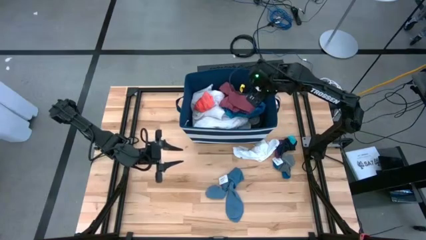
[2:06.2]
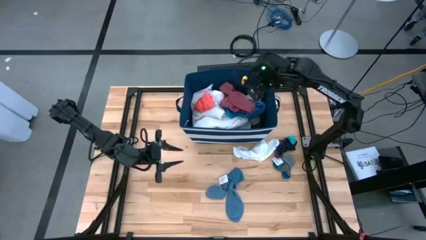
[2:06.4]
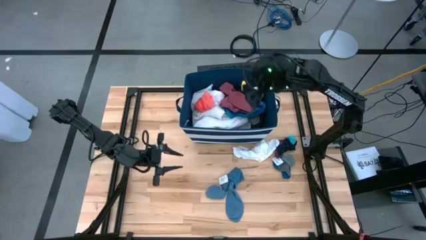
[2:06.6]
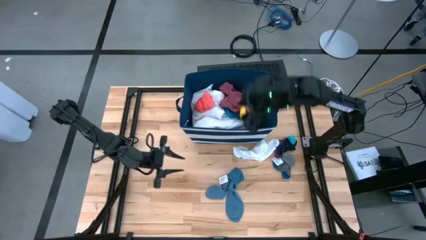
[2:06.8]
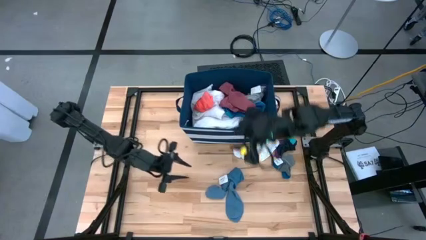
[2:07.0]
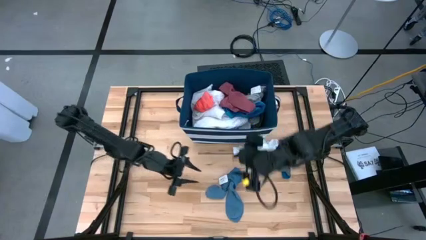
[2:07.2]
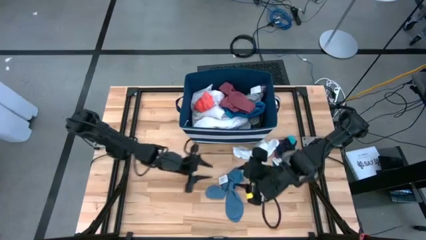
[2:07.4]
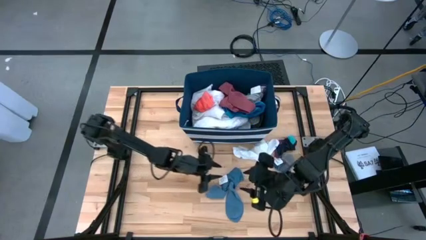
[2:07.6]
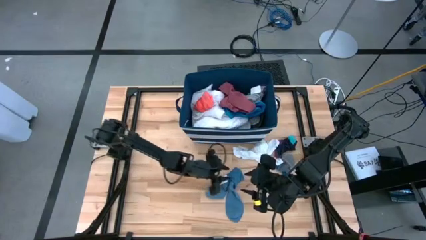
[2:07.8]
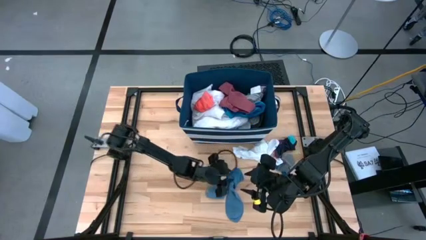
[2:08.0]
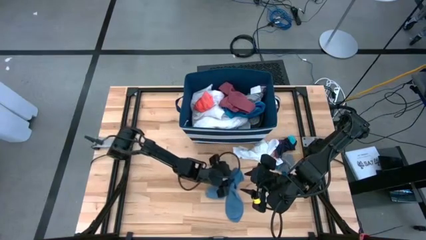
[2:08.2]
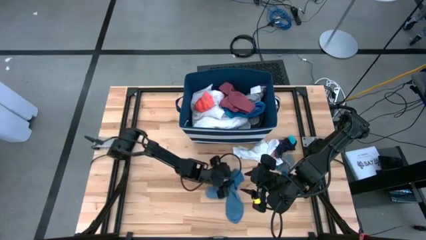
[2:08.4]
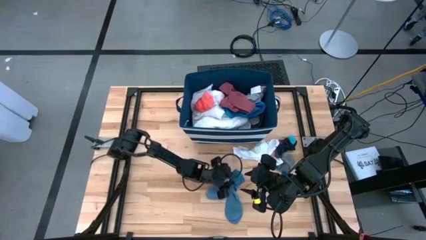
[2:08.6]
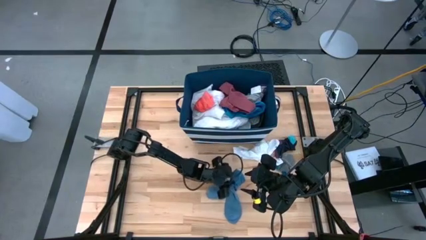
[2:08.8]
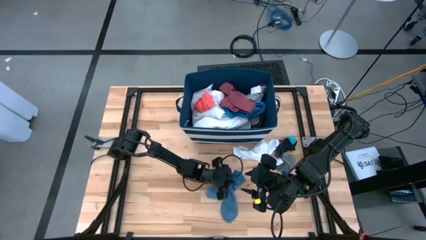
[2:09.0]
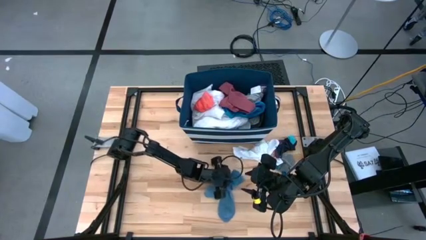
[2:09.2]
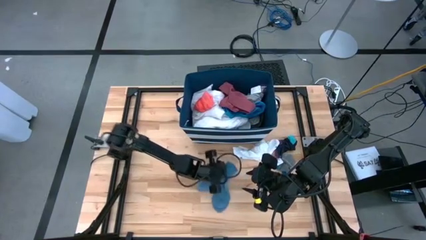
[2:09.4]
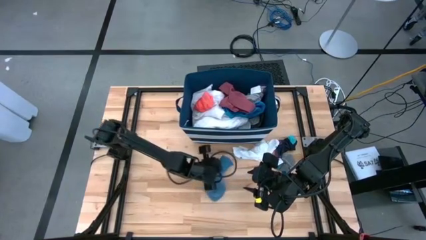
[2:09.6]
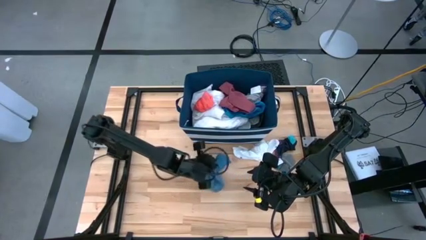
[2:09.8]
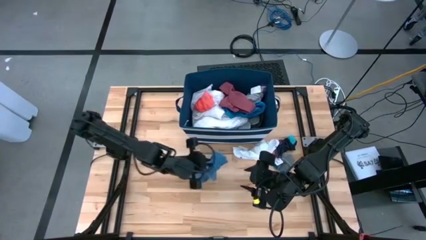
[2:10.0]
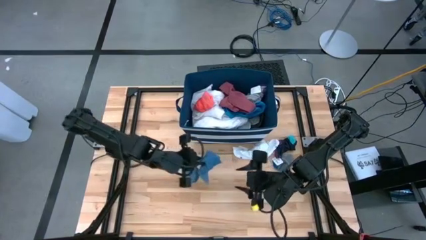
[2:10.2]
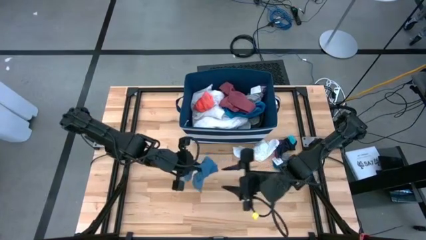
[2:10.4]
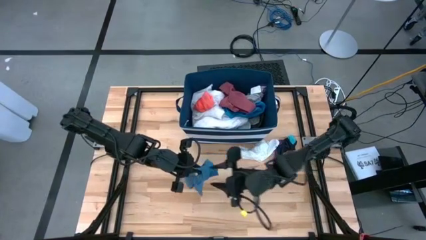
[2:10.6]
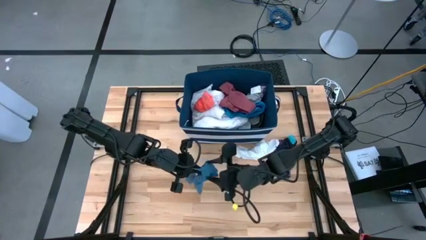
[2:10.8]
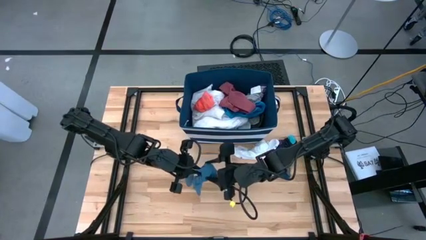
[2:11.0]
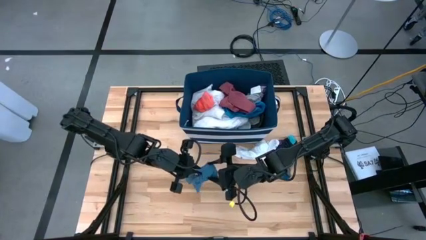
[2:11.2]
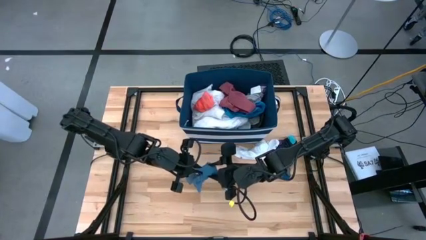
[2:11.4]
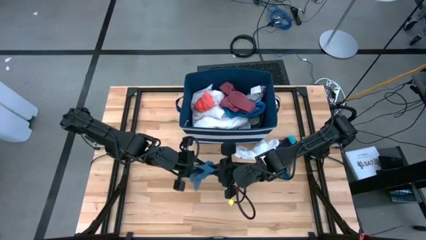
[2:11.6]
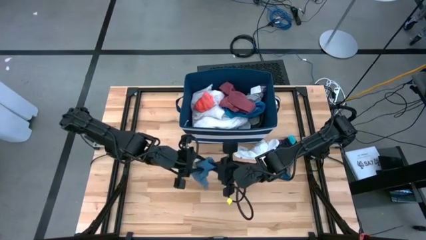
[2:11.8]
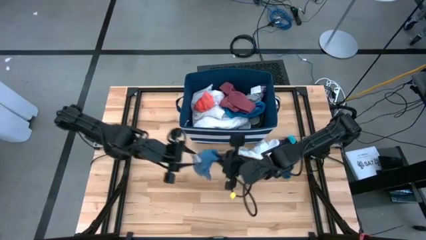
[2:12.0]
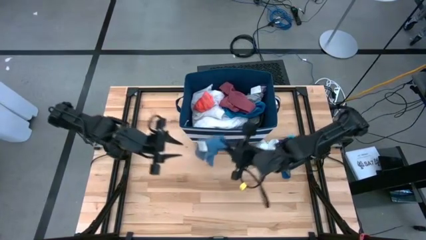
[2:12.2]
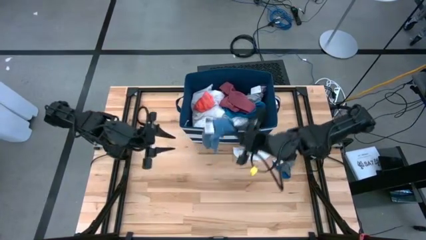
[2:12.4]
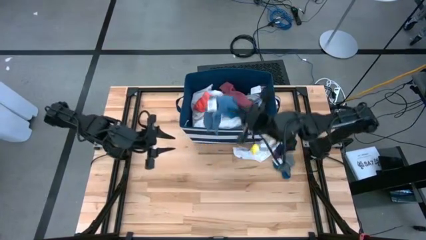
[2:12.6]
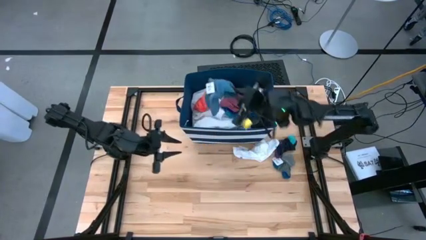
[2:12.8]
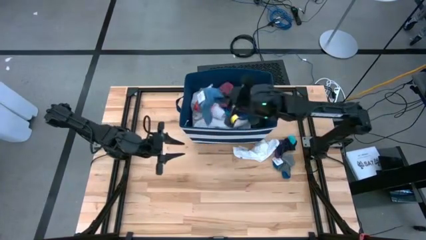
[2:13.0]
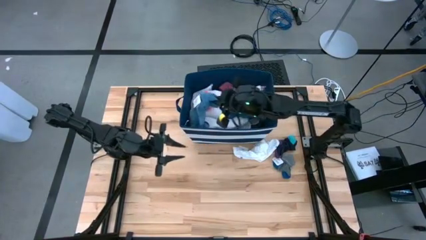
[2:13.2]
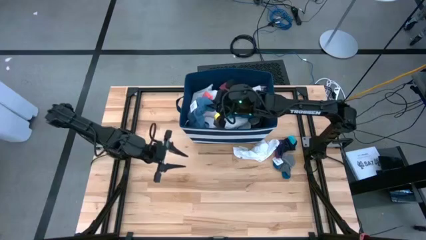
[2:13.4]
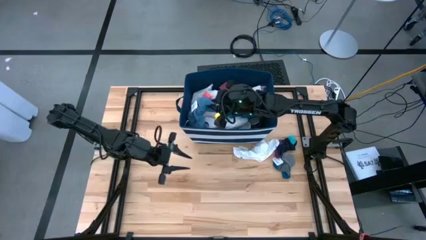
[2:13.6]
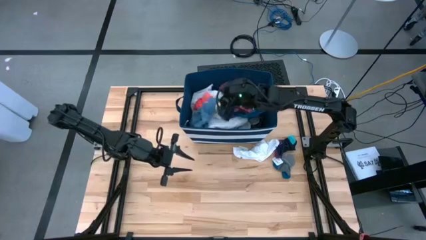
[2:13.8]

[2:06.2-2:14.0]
Task: Sort clothes
Put the blue socks into the blue laundry organizer
